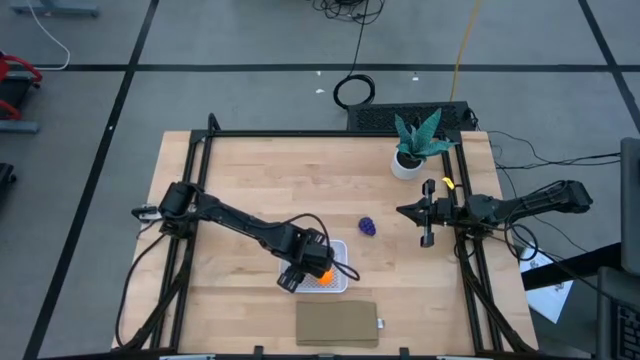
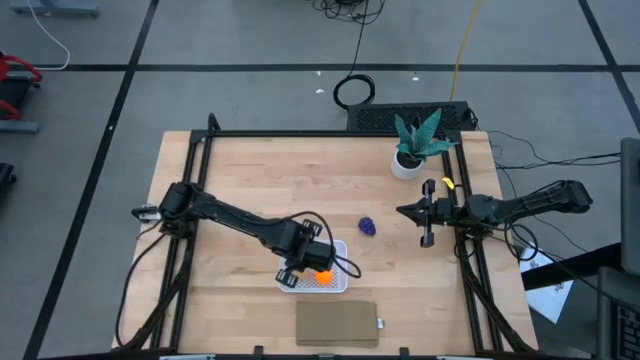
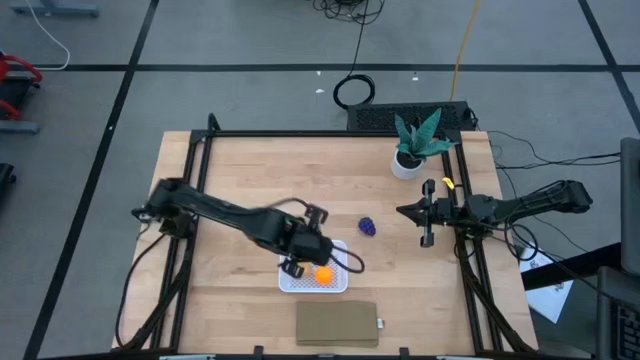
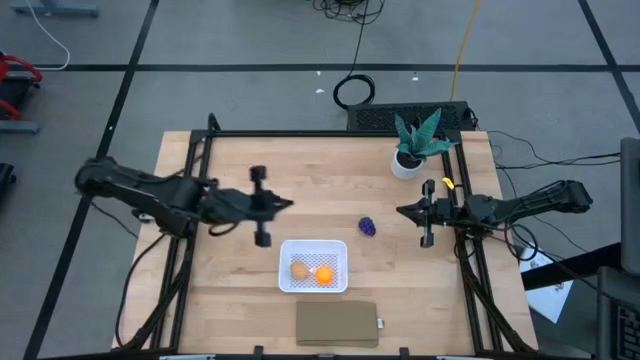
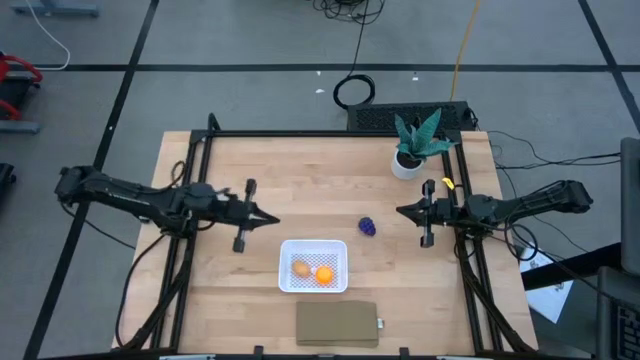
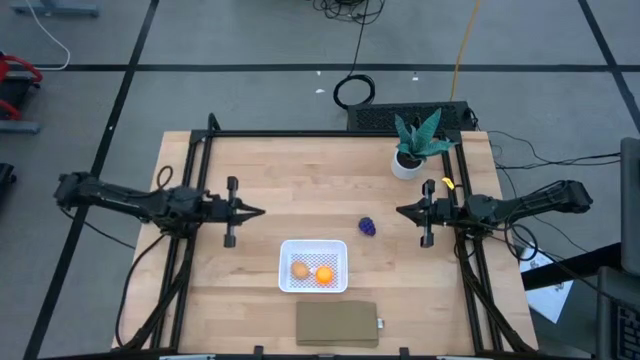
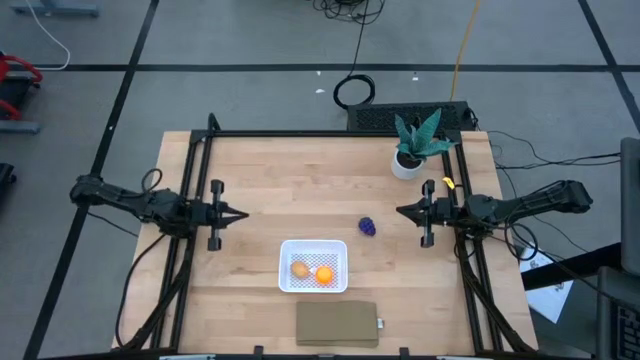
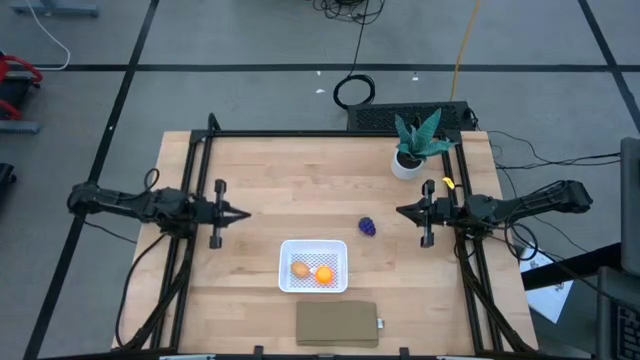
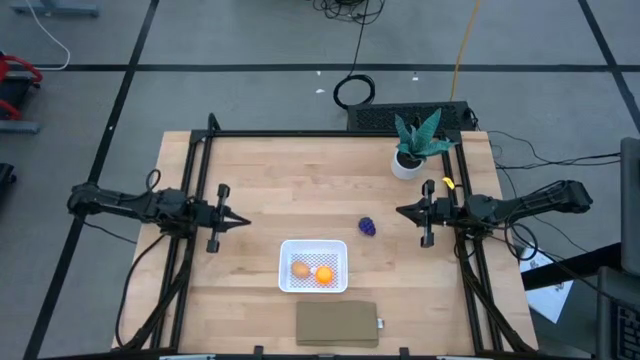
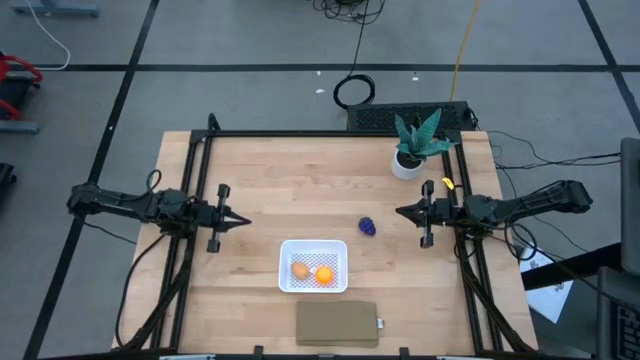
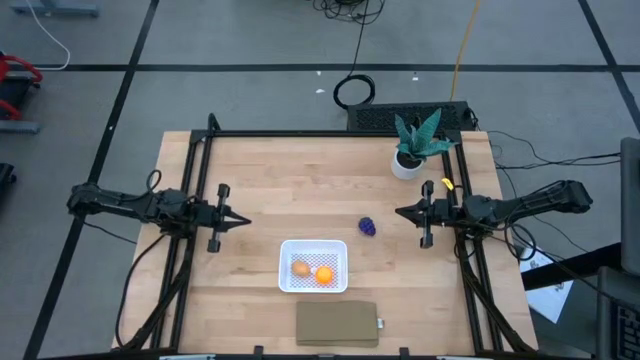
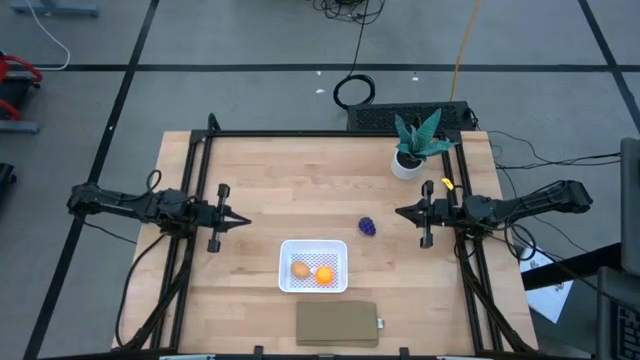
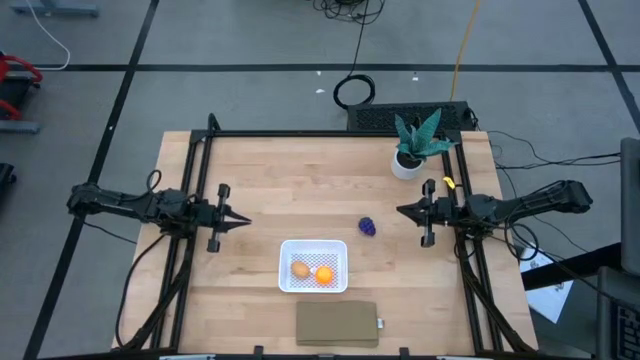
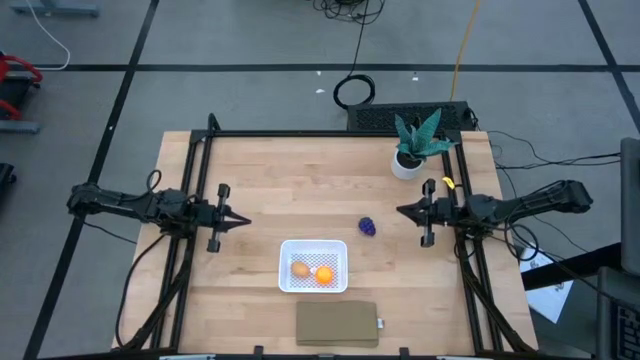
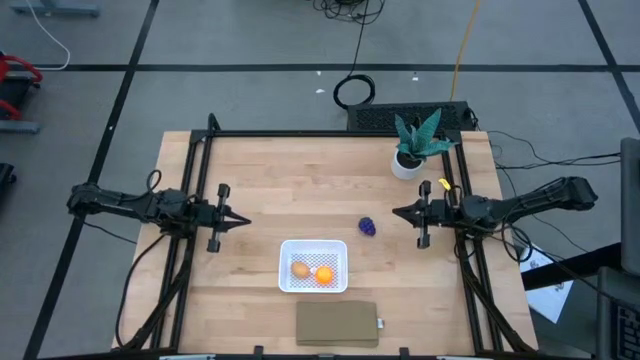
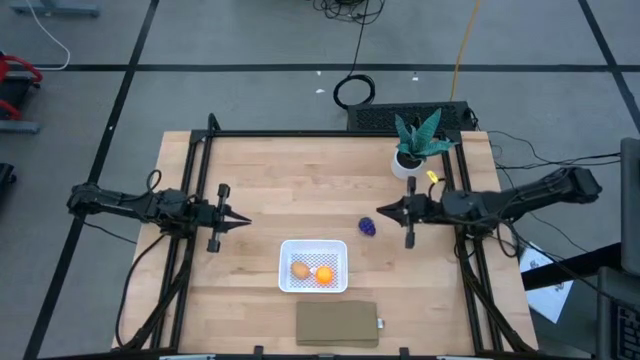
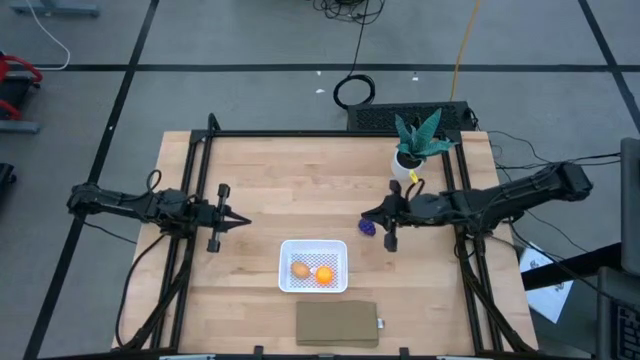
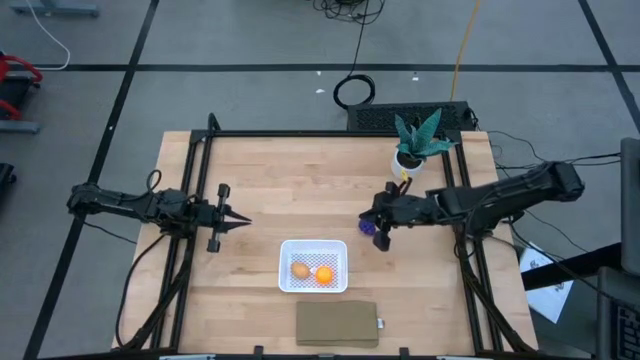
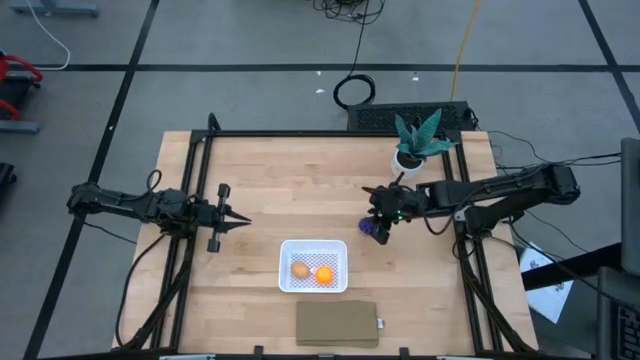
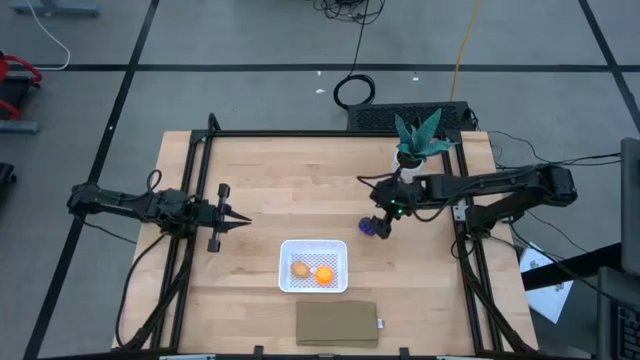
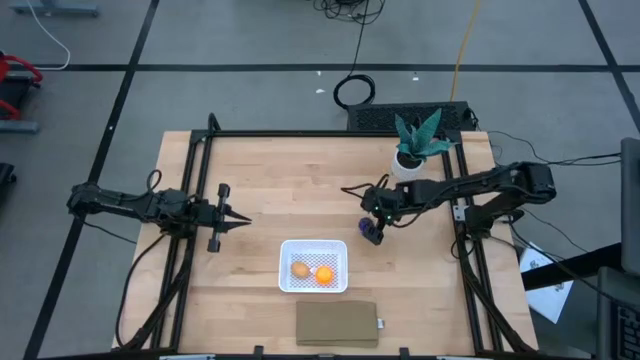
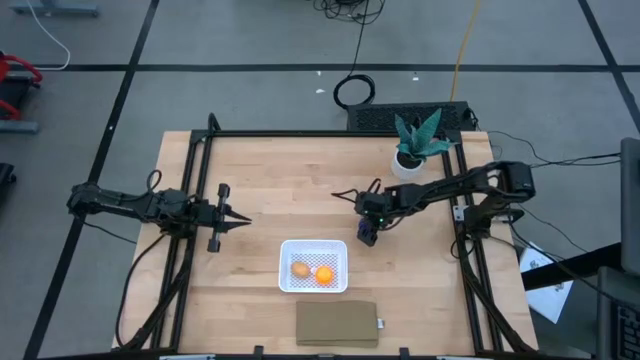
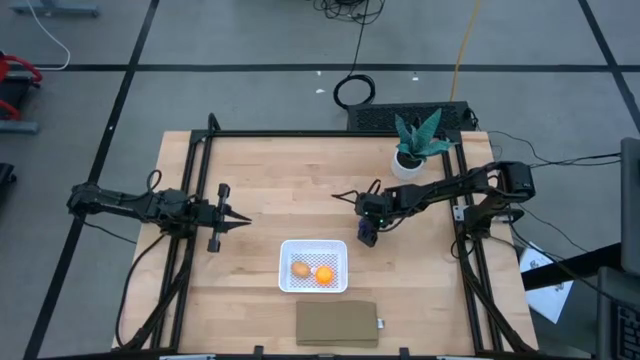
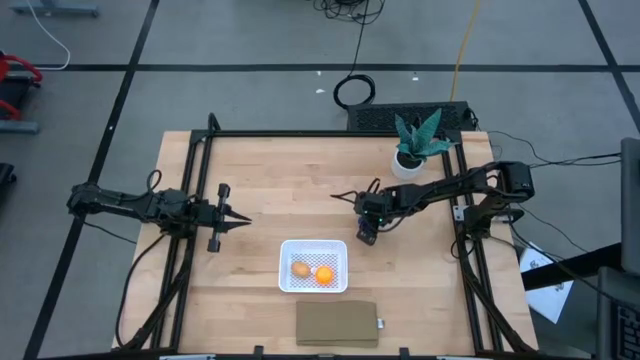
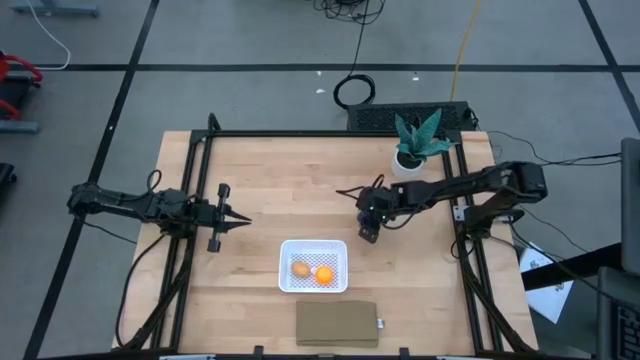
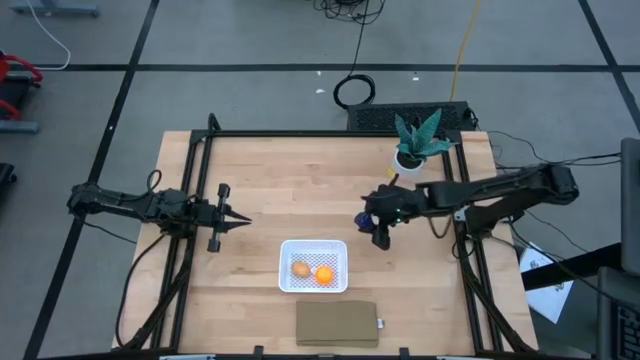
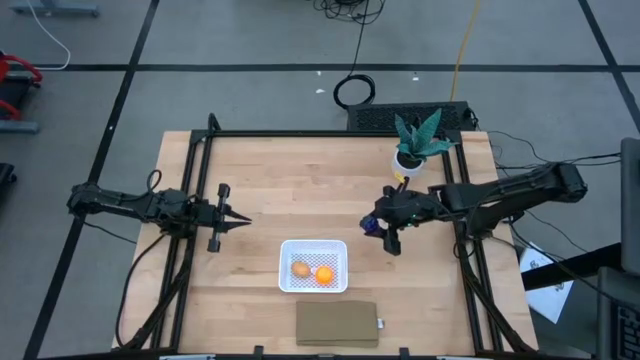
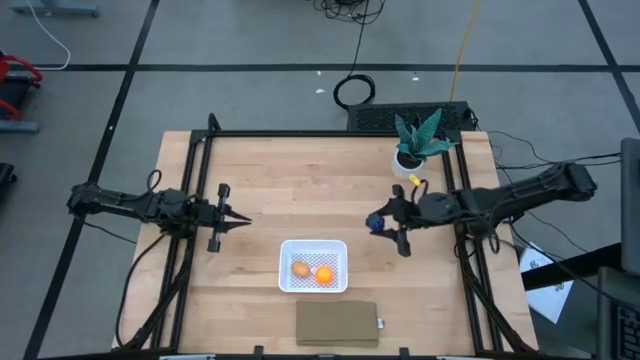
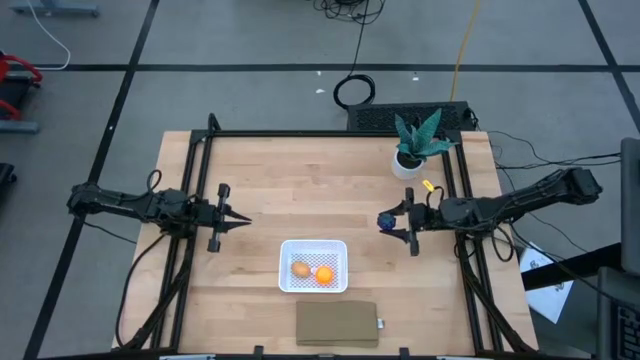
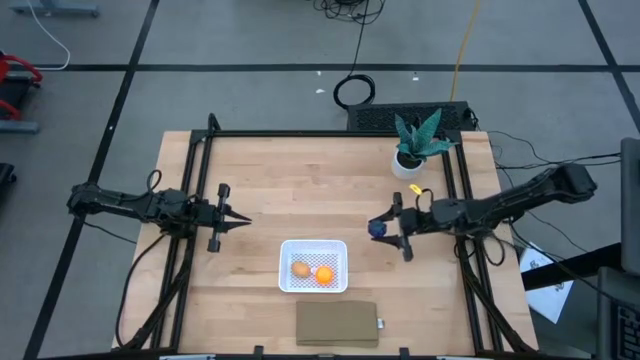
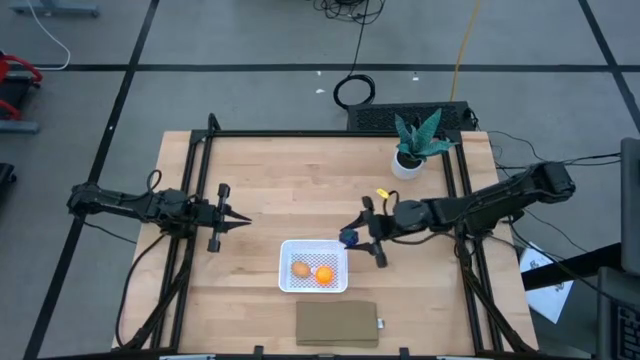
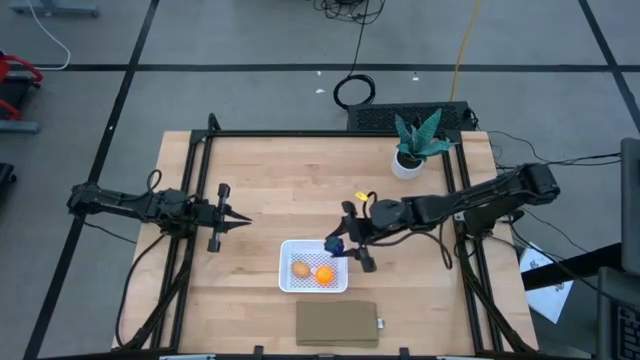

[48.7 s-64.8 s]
Task: Pick and placing Produce into tupperware
Put the blackberry into the basket

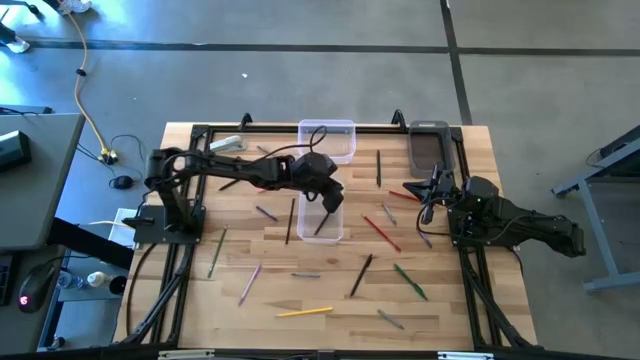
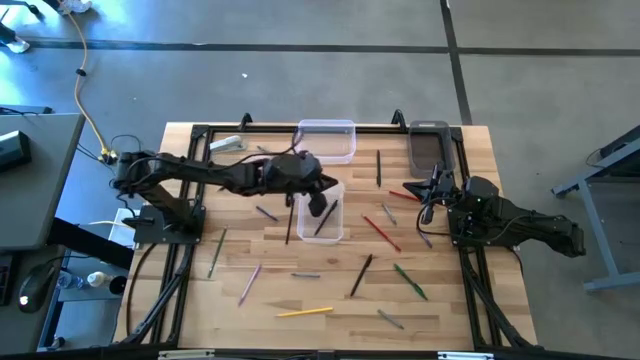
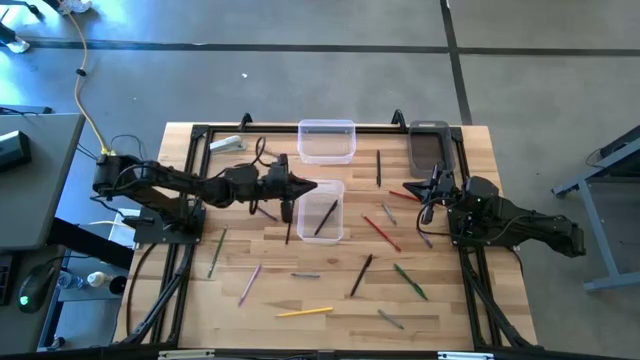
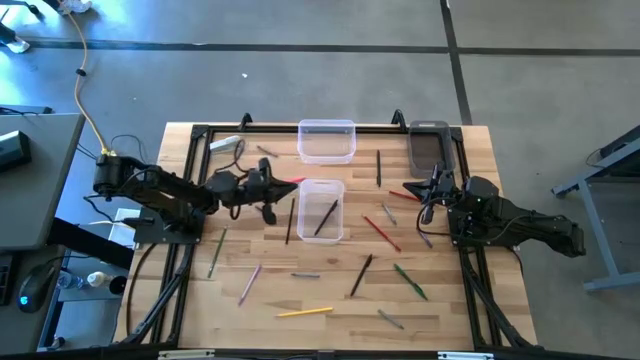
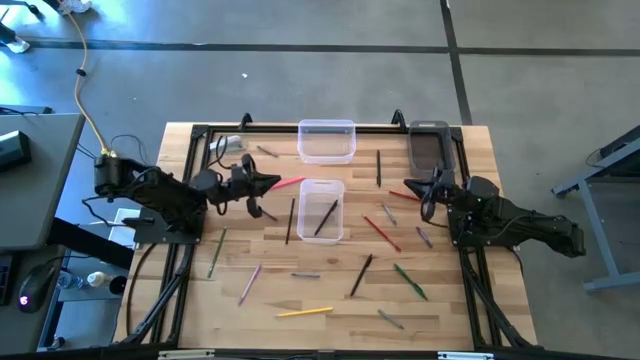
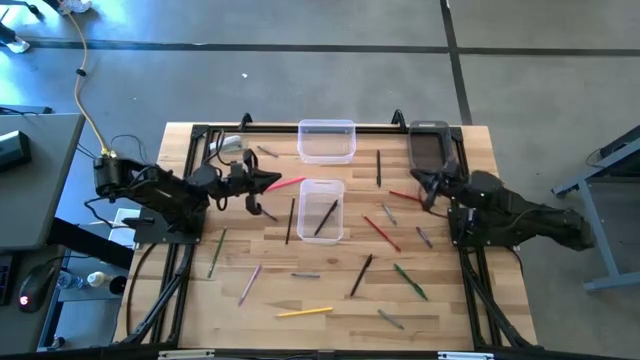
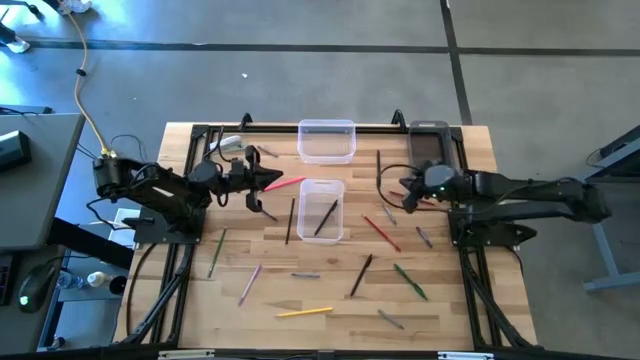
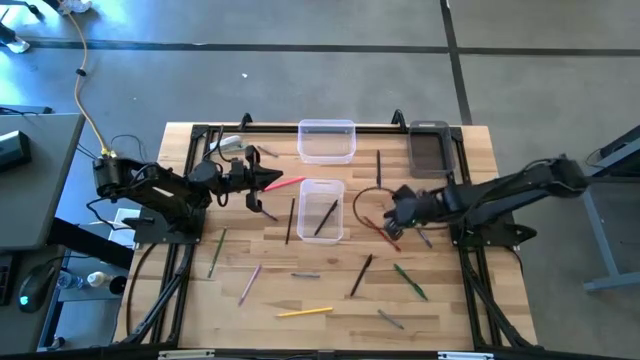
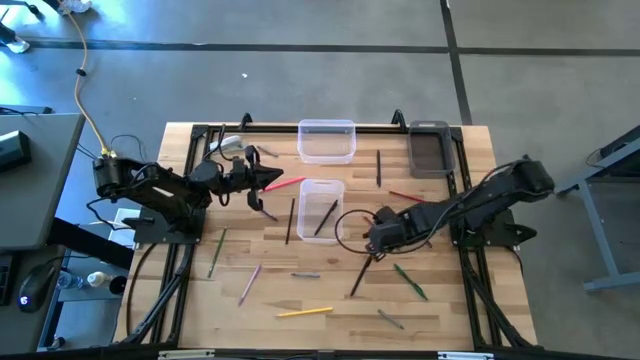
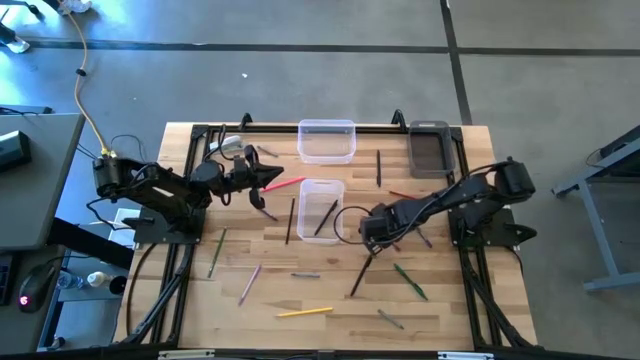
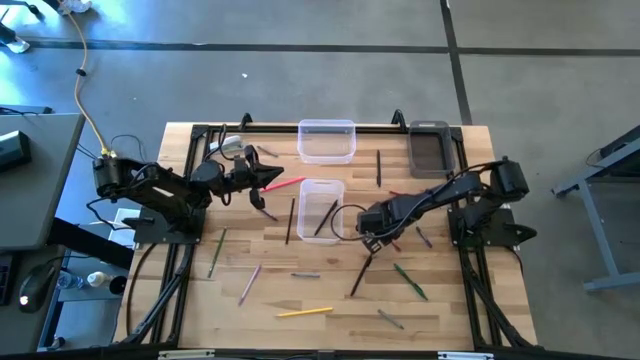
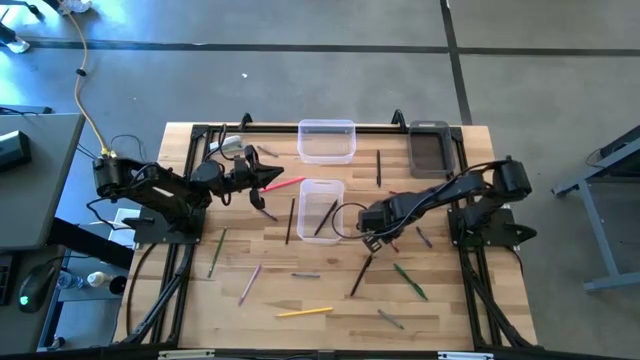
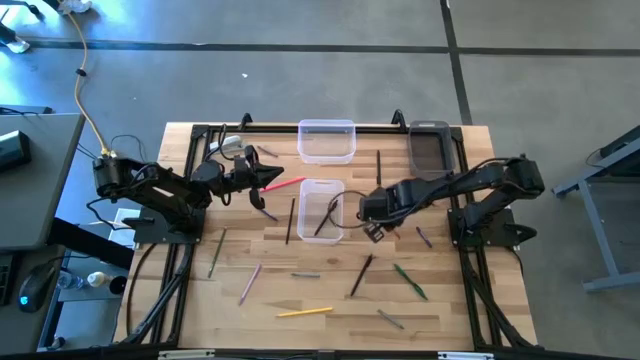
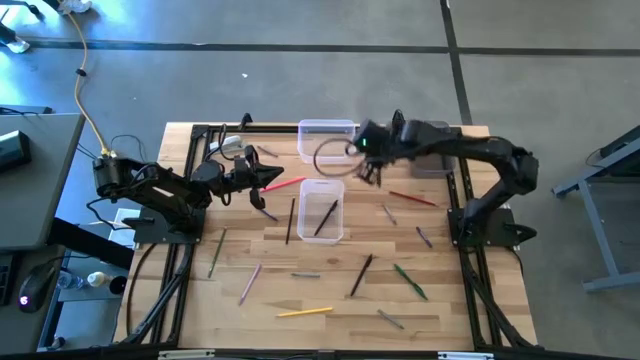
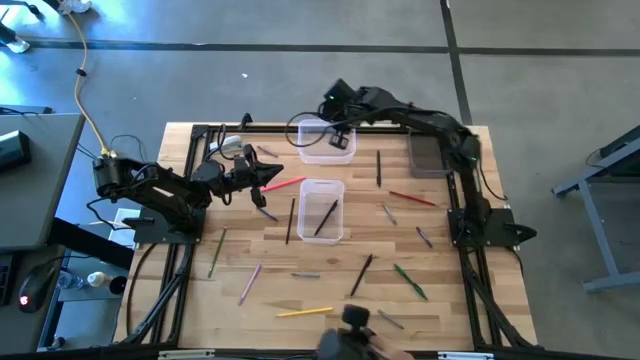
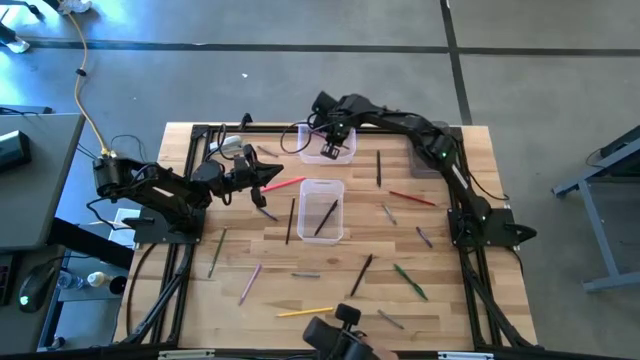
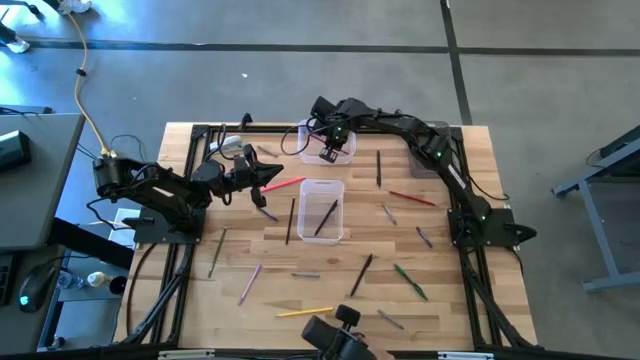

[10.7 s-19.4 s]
Task: Sort crayons/erasers/pens/pencils in bins
Put the bottom red color pencil into the top transparent bin
